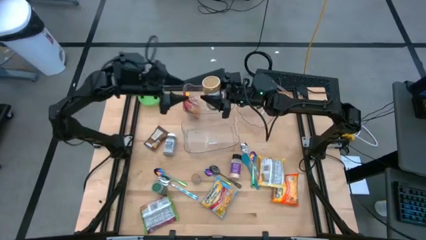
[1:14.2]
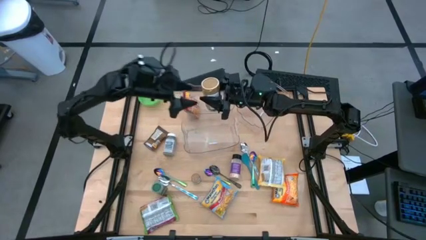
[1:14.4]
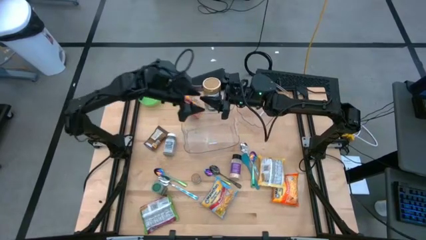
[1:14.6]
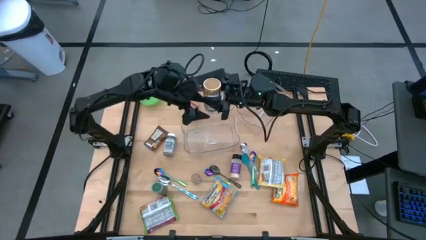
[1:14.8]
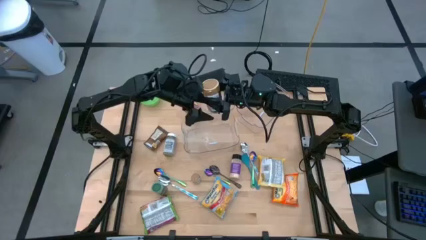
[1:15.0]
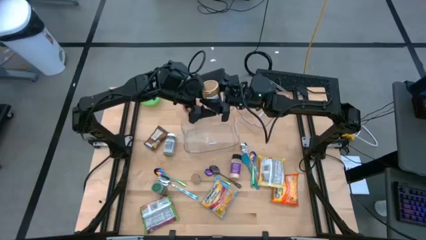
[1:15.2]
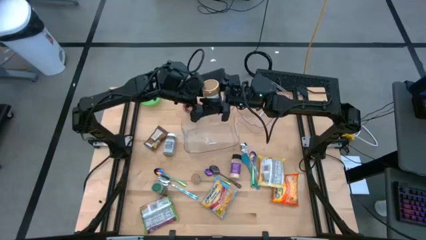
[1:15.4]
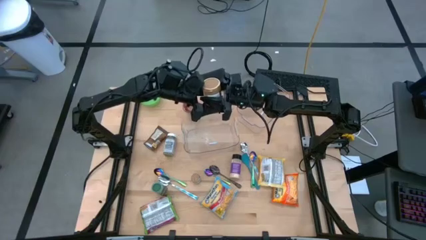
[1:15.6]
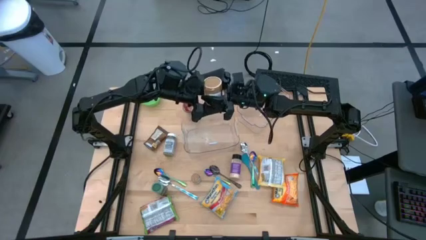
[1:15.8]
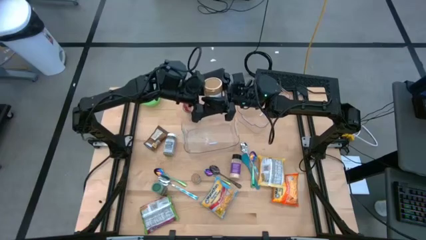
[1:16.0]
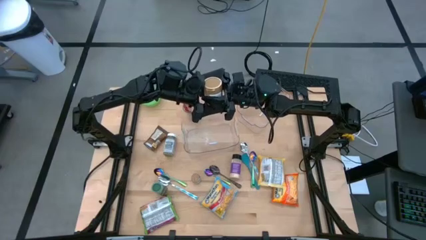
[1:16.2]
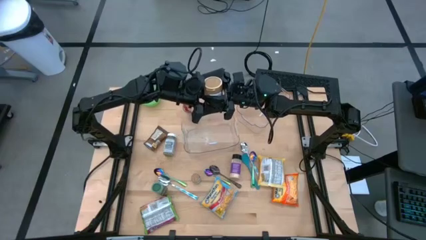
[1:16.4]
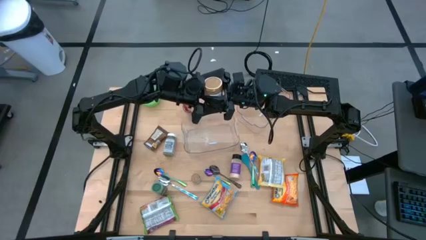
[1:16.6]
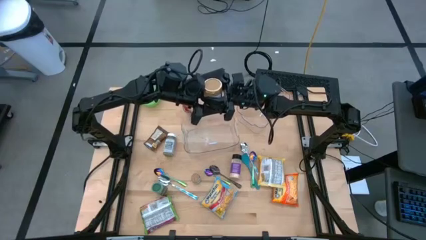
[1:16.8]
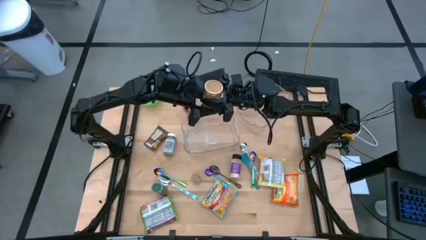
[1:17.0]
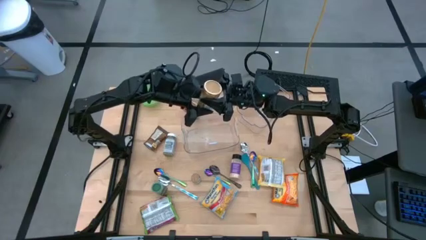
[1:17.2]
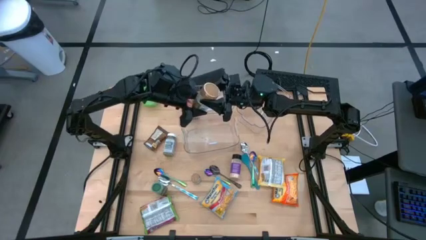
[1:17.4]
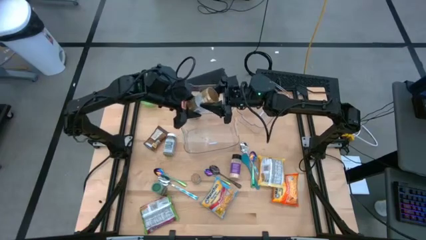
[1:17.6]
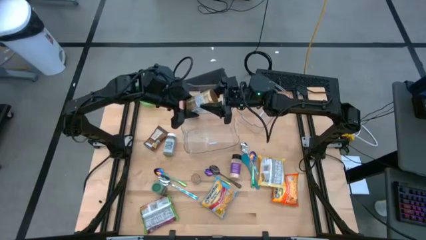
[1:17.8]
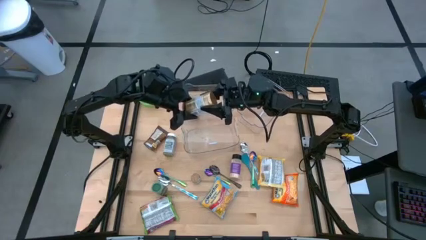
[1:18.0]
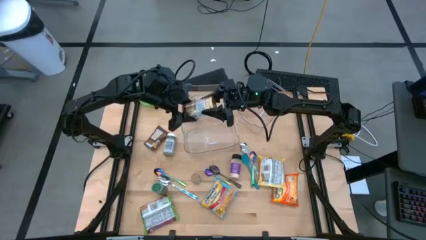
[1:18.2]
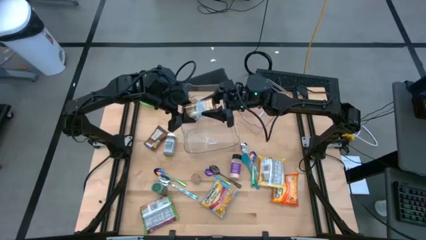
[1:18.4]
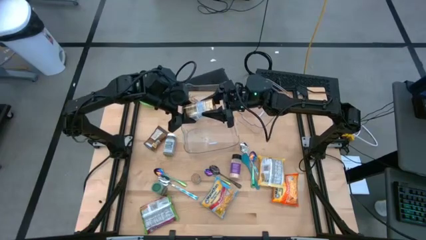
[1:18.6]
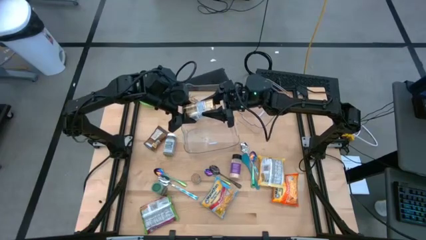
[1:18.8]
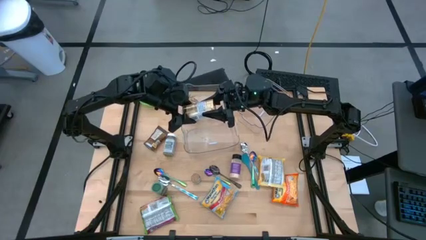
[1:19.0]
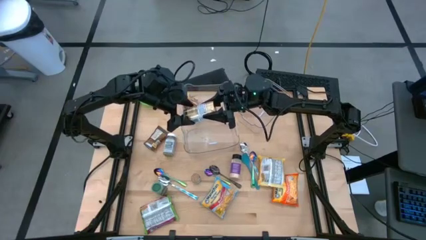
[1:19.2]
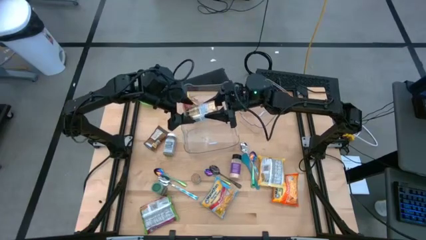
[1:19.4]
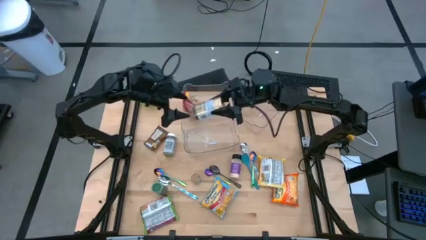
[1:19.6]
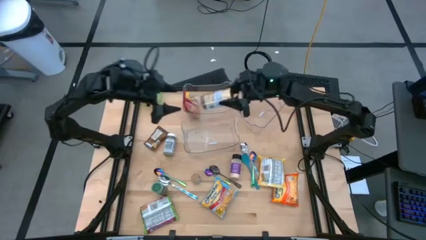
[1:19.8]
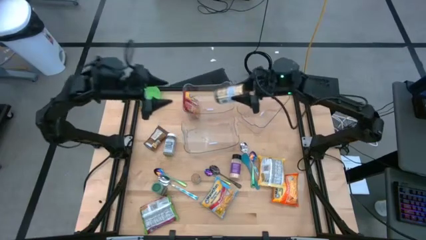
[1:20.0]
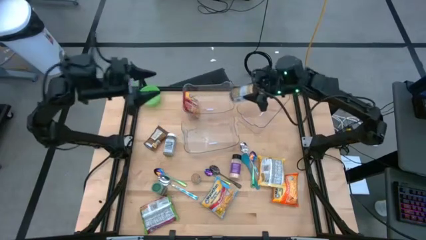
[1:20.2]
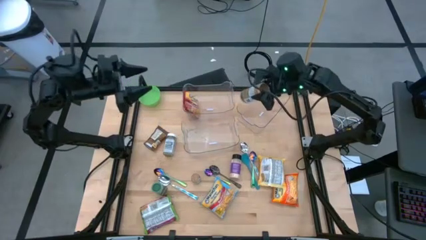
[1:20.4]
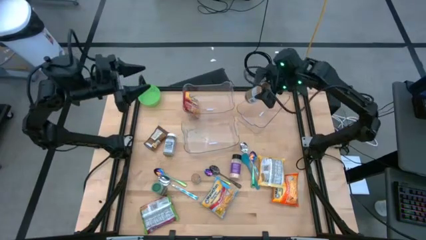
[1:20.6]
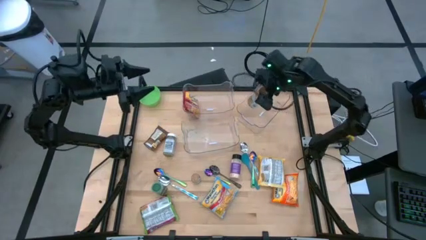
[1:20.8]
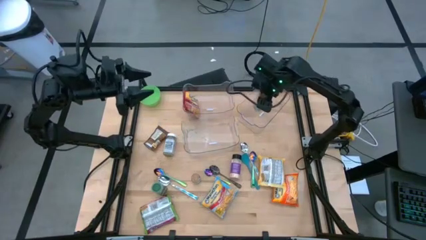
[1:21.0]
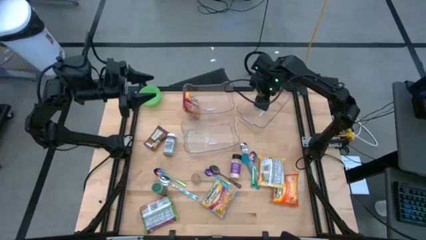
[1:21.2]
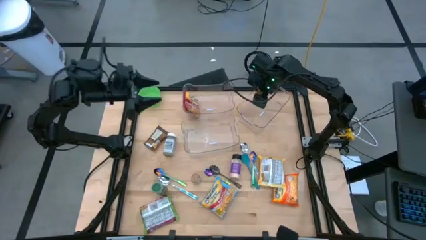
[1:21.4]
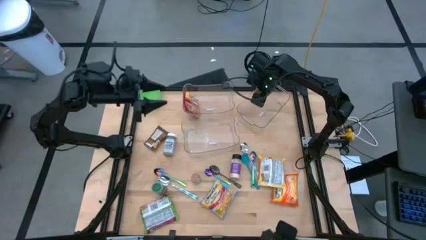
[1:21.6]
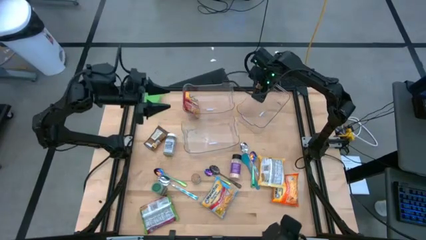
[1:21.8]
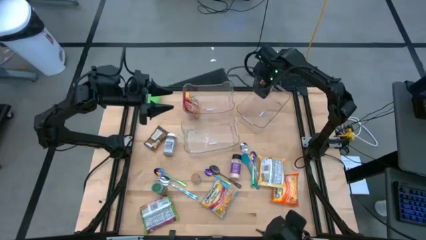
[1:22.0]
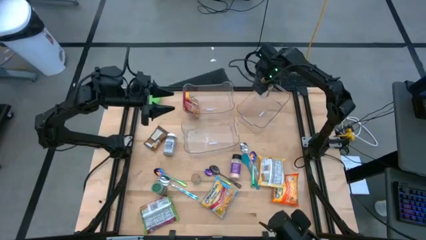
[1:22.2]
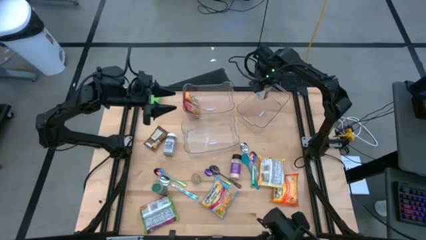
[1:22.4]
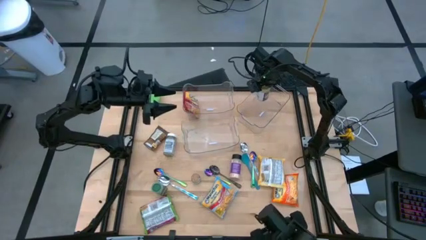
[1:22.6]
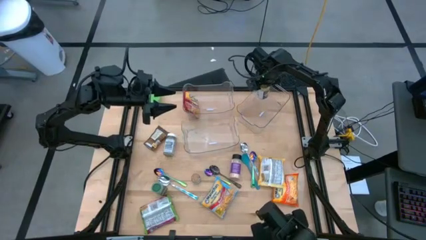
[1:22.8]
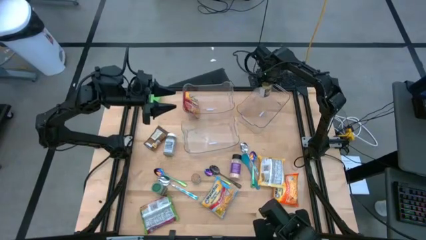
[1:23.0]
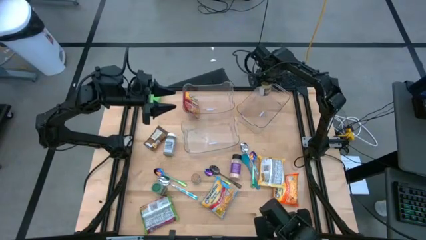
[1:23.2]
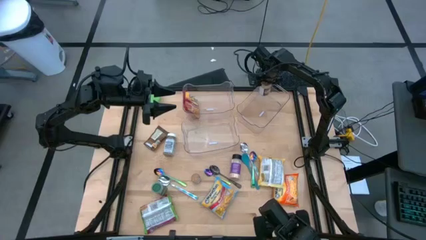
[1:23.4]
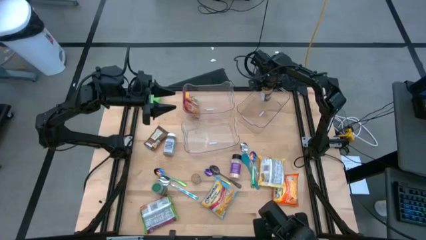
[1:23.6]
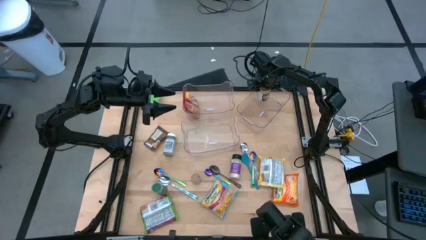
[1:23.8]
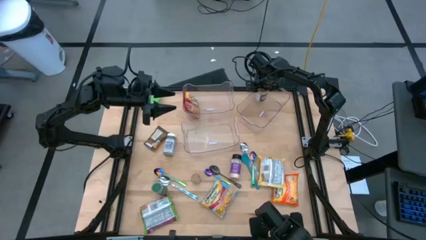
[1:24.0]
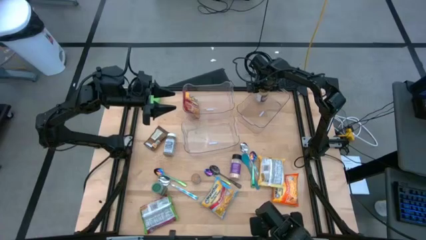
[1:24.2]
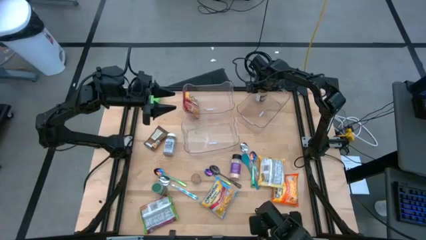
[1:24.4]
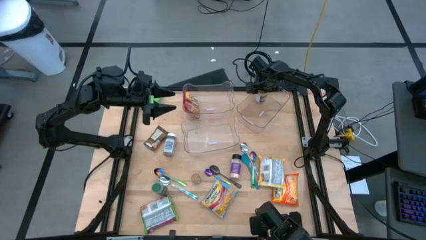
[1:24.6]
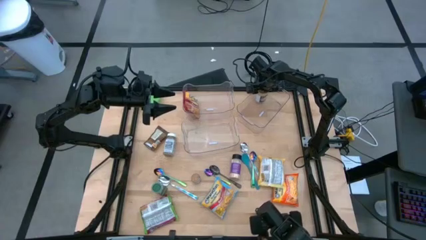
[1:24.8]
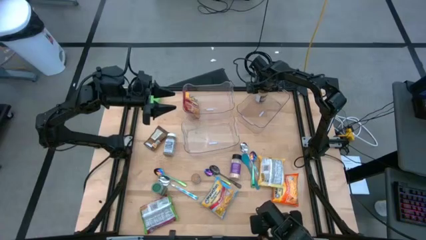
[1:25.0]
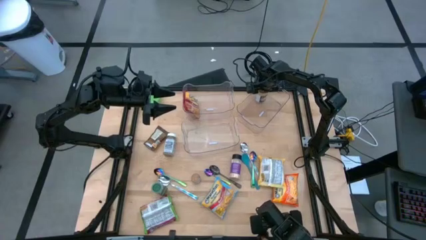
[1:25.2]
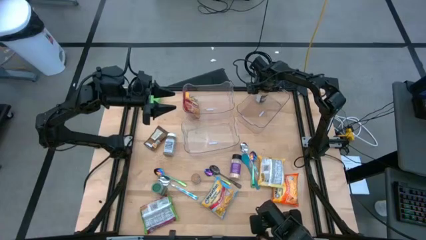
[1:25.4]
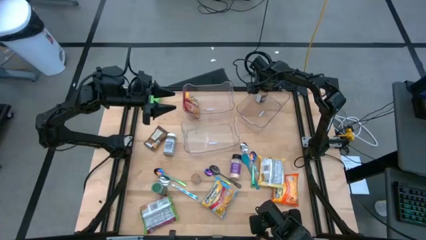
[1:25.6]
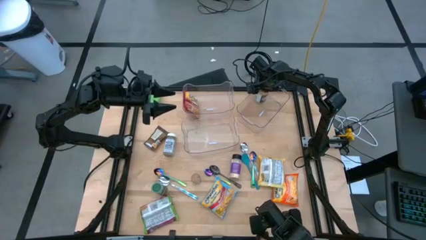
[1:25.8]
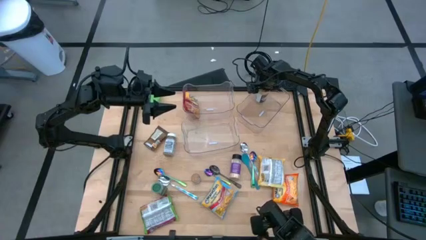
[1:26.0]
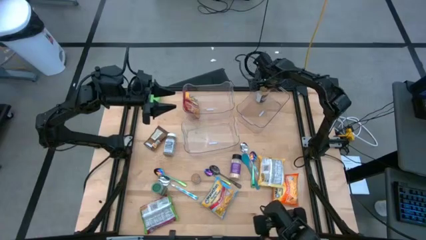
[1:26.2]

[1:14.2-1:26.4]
Task: Pick & Place Food Item
Put the gold seasoning bottle into the top right transparent bin
